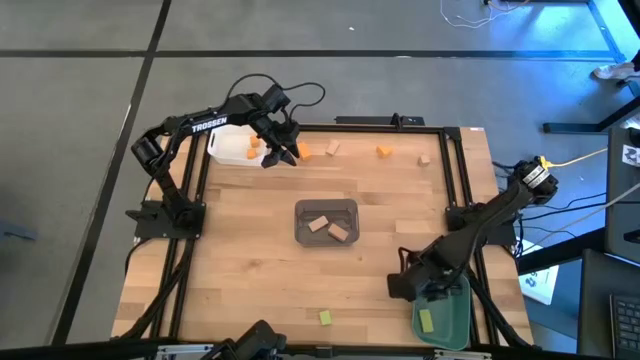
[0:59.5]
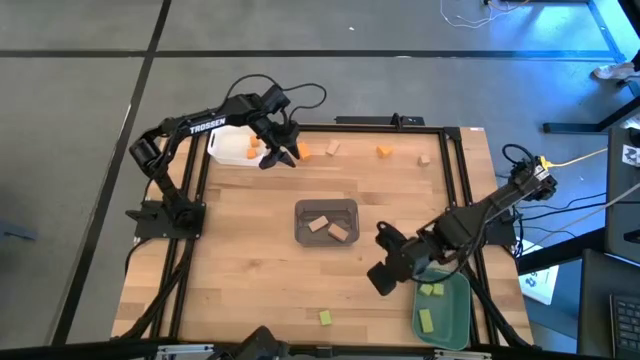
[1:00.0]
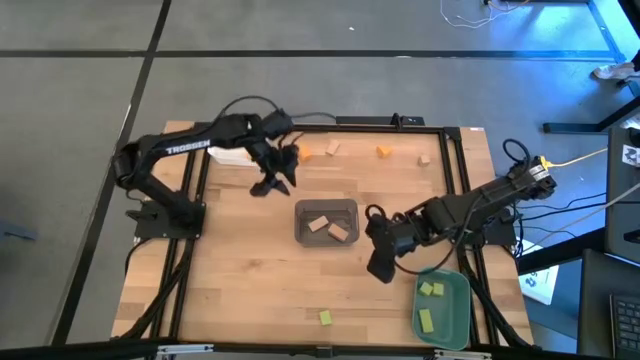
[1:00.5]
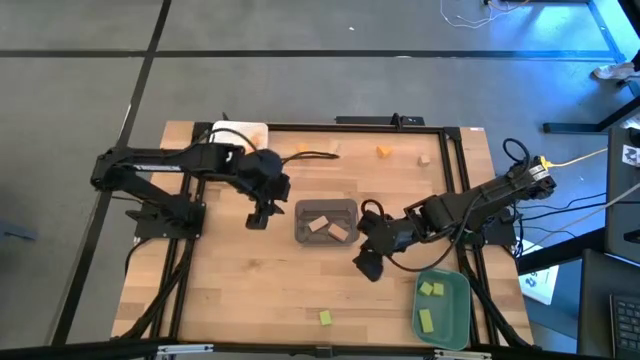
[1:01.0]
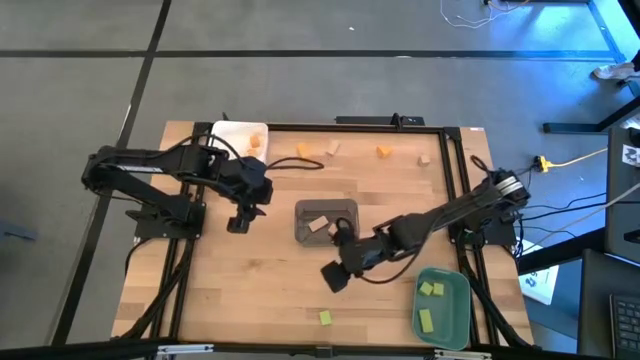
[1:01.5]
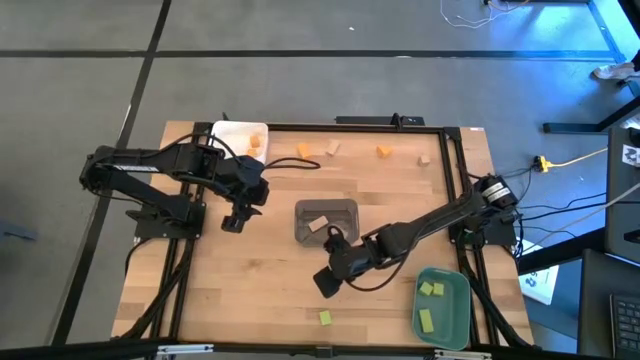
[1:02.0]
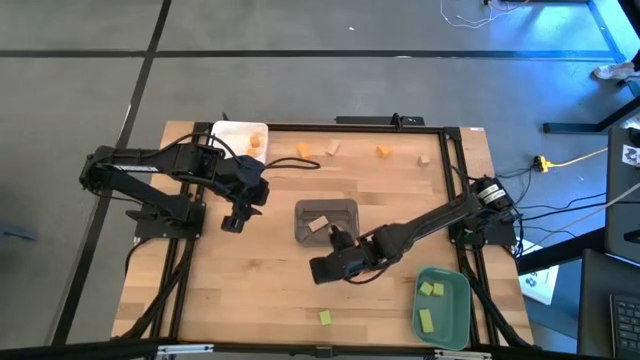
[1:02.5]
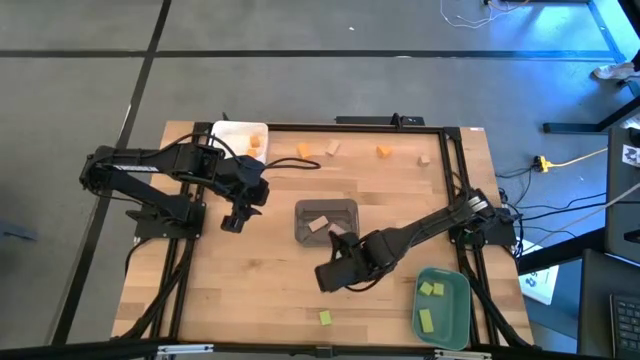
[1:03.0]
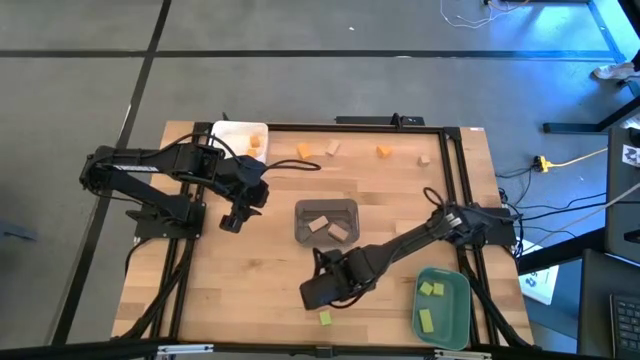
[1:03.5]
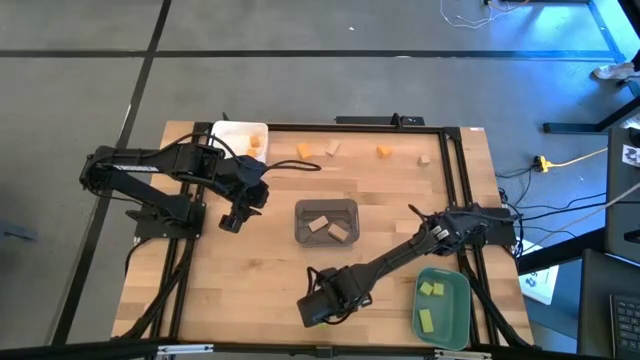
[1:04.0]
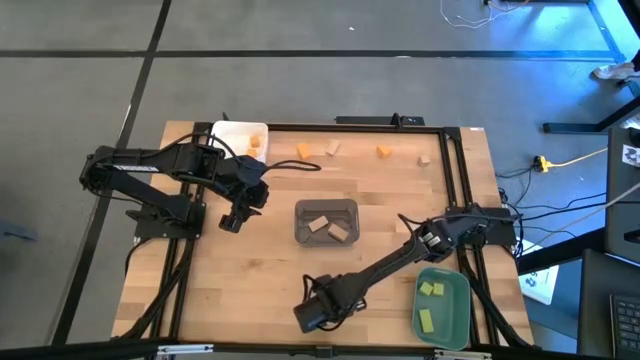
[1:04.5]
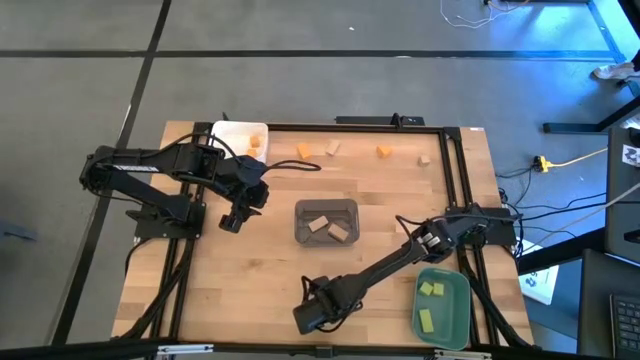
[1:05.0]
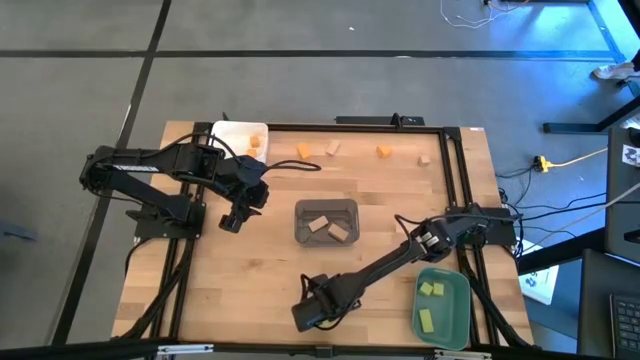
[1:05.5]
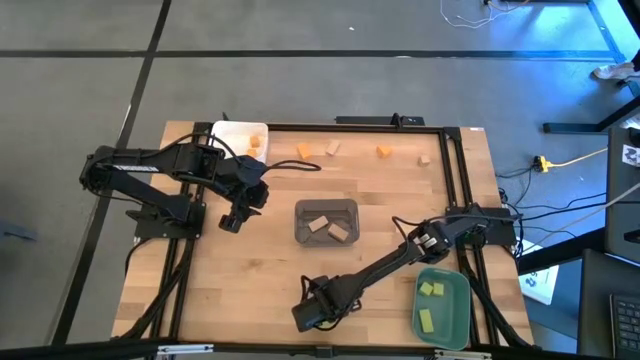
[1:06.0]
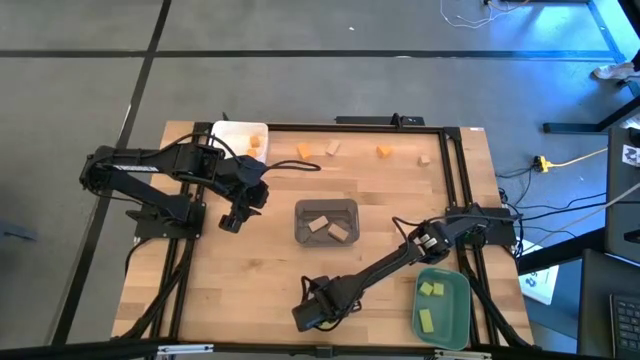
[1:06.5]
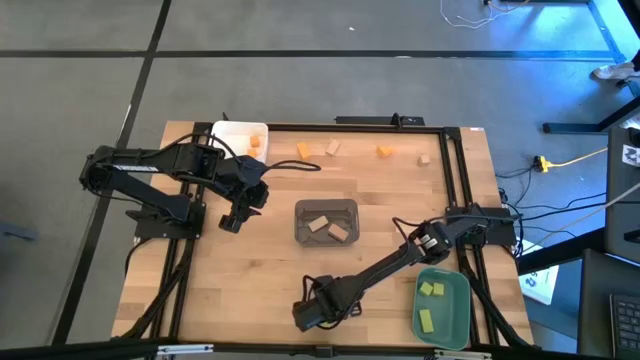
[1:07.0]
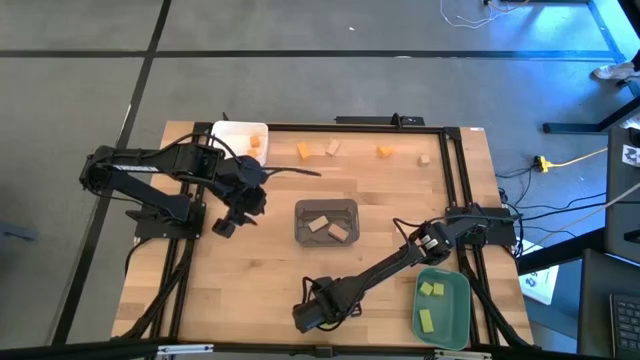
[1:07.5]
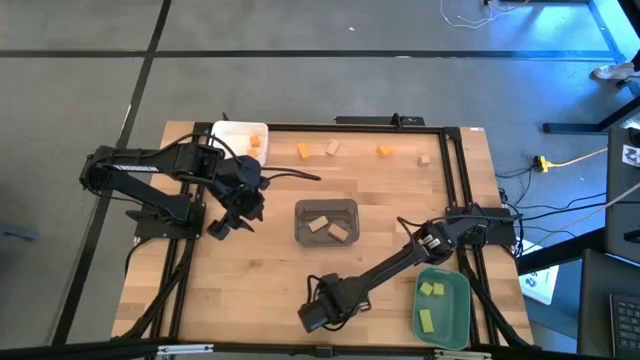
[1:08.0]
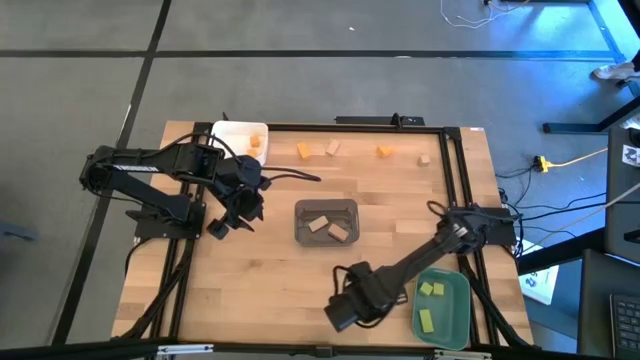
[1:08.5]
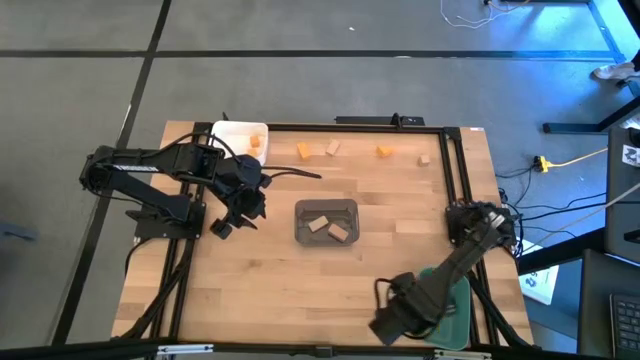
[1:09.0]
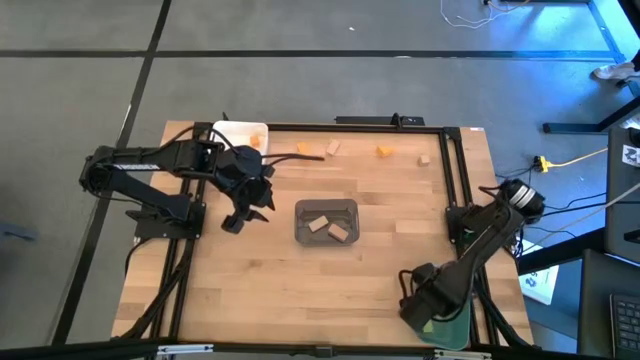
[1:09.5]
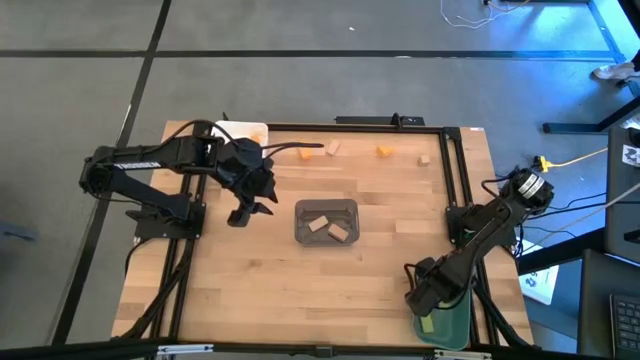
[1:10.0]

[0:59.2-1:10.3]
Task: Sort & place blocks by color
Put the light green block into the green bin

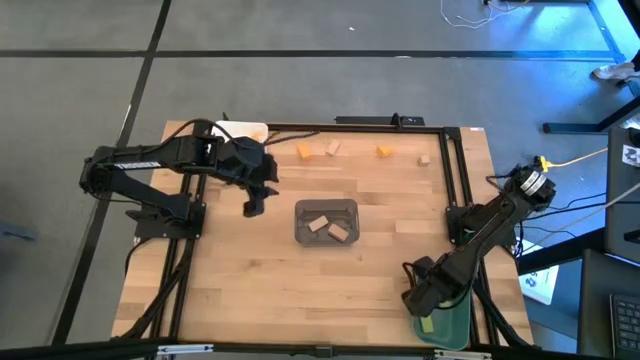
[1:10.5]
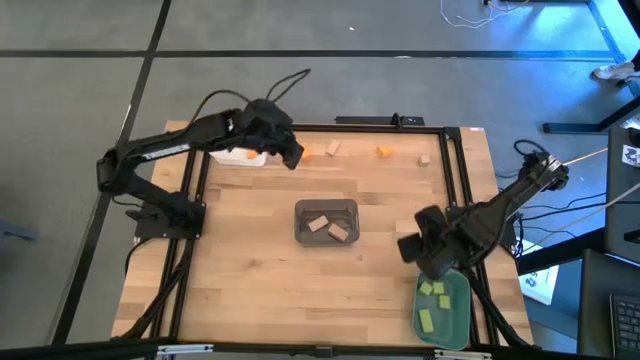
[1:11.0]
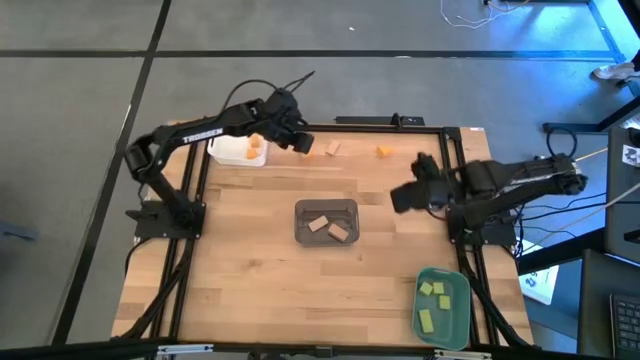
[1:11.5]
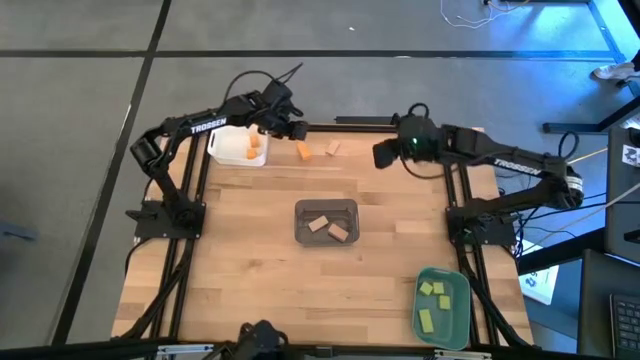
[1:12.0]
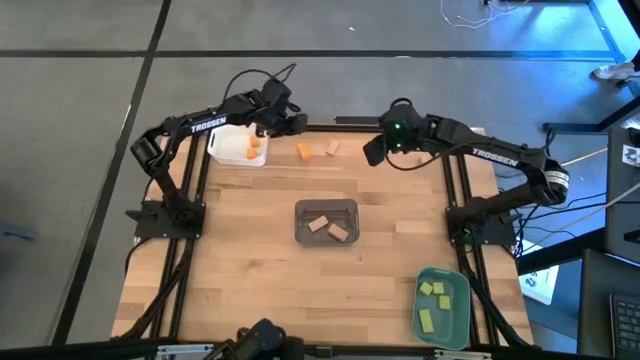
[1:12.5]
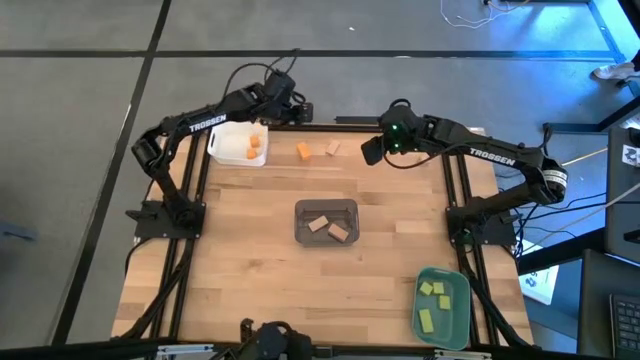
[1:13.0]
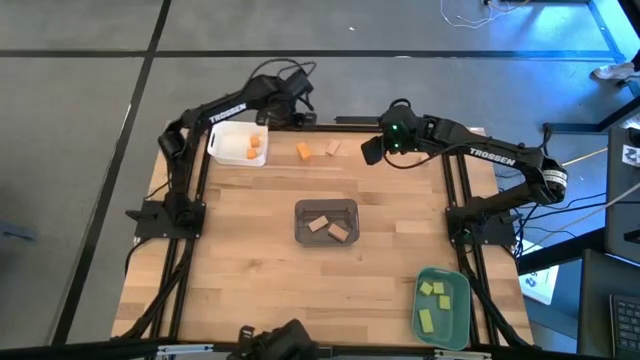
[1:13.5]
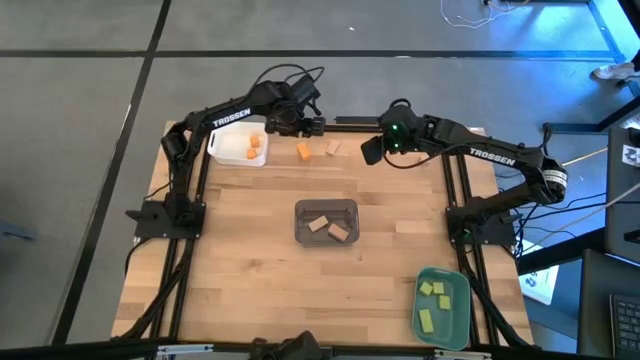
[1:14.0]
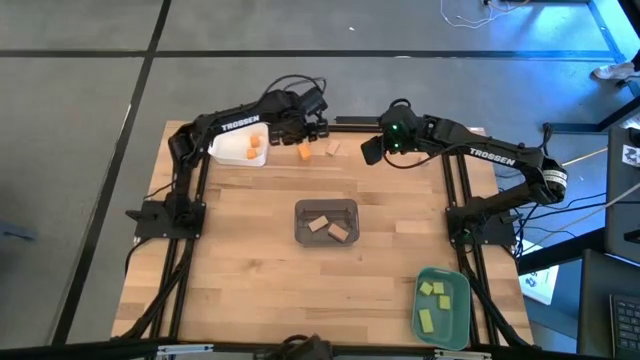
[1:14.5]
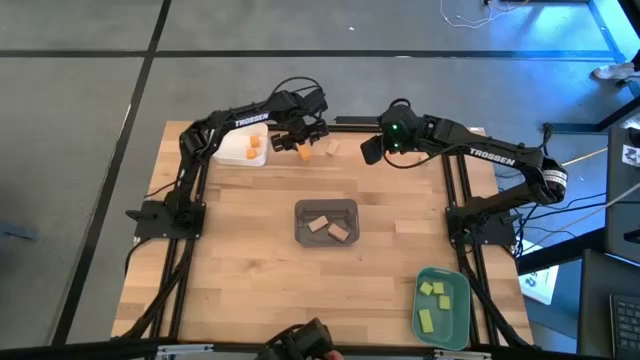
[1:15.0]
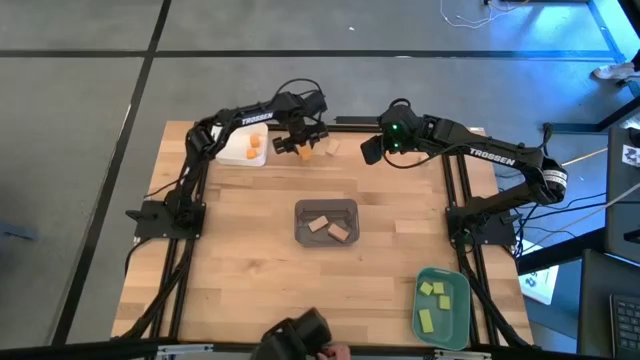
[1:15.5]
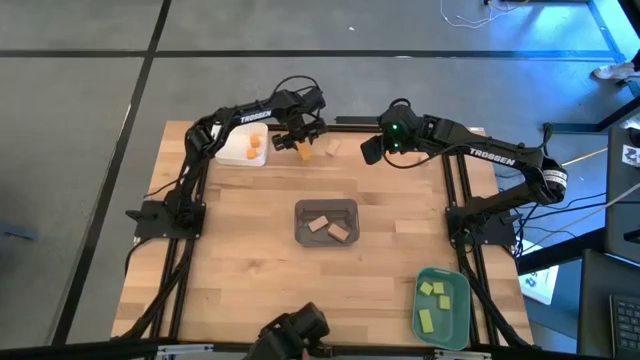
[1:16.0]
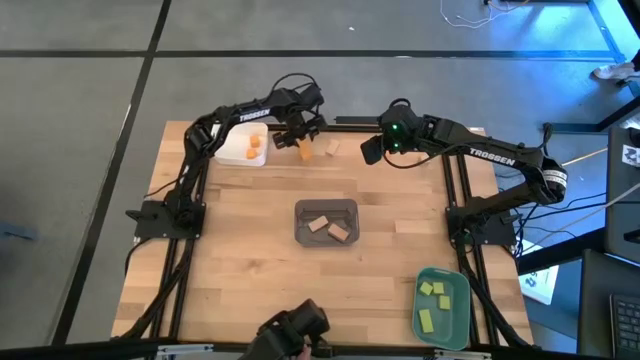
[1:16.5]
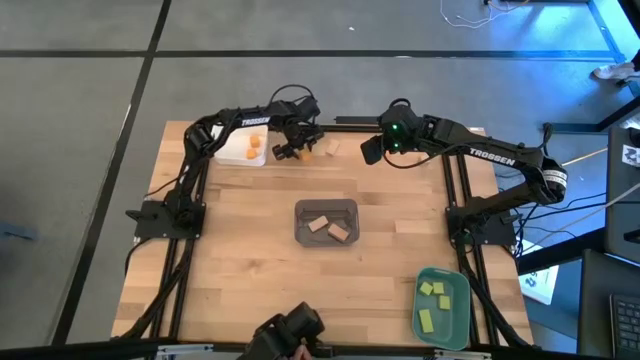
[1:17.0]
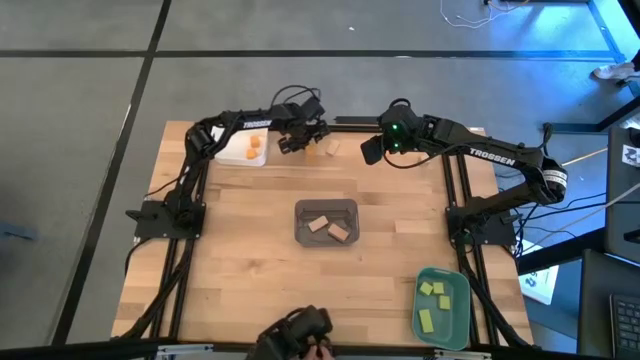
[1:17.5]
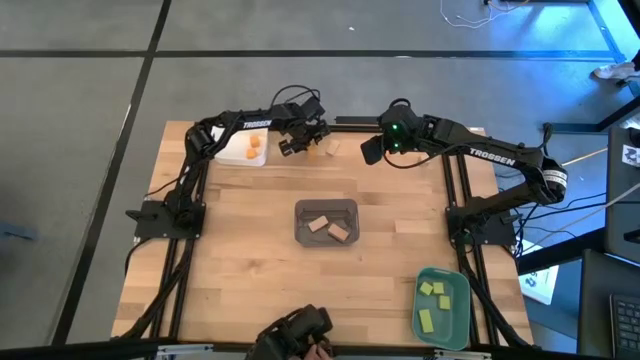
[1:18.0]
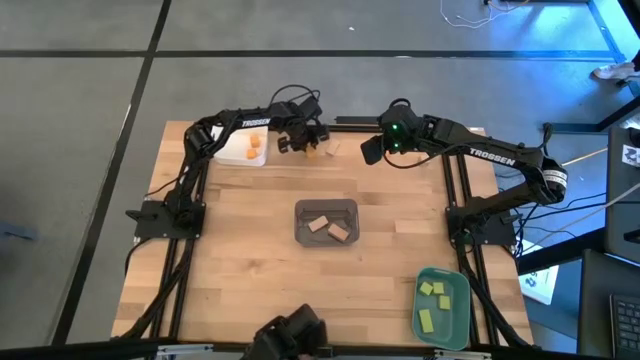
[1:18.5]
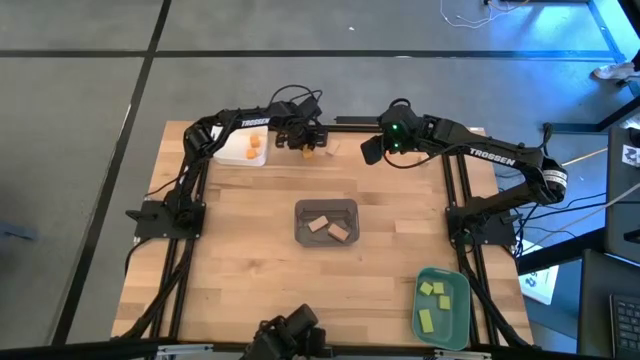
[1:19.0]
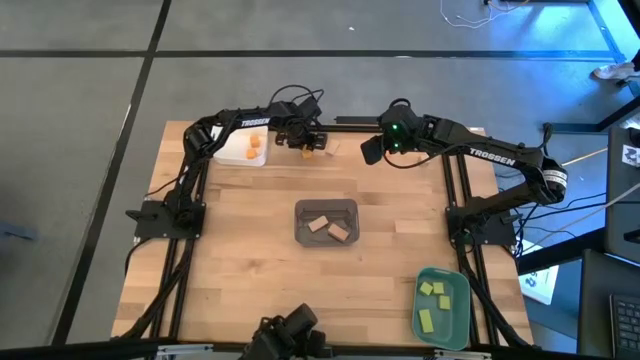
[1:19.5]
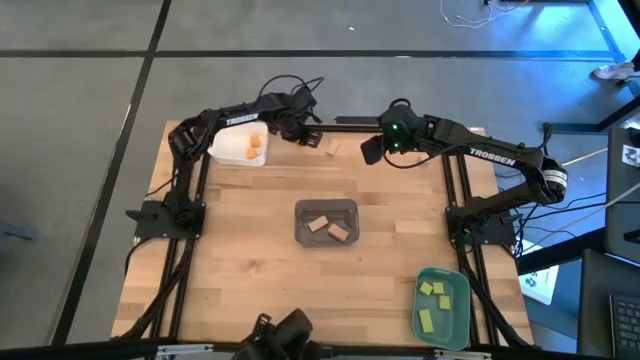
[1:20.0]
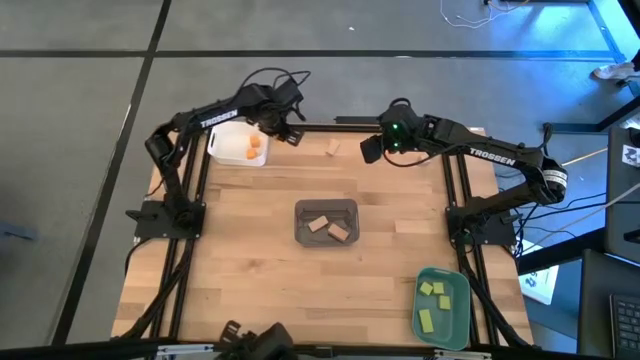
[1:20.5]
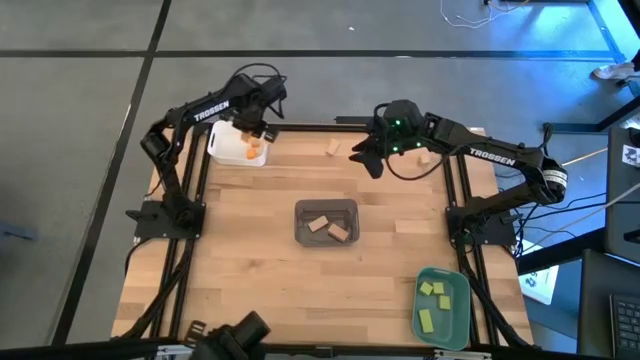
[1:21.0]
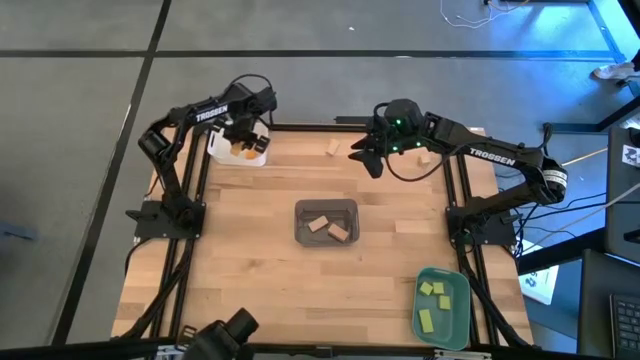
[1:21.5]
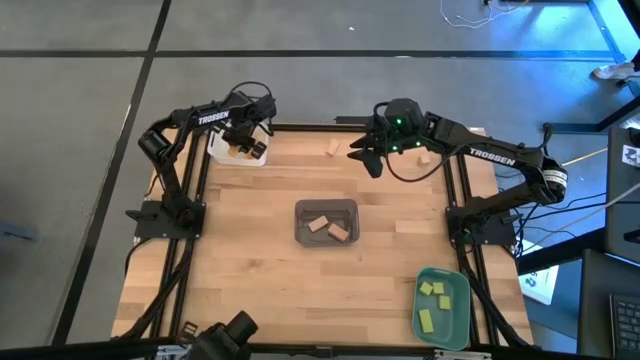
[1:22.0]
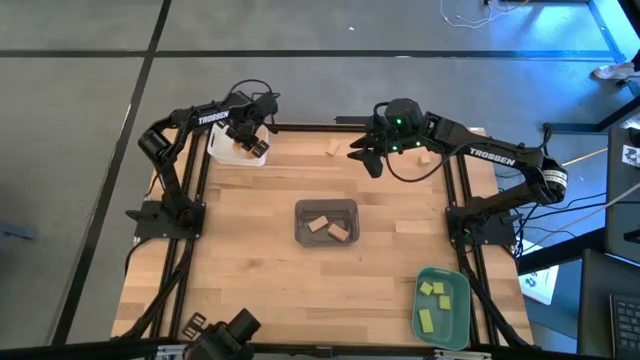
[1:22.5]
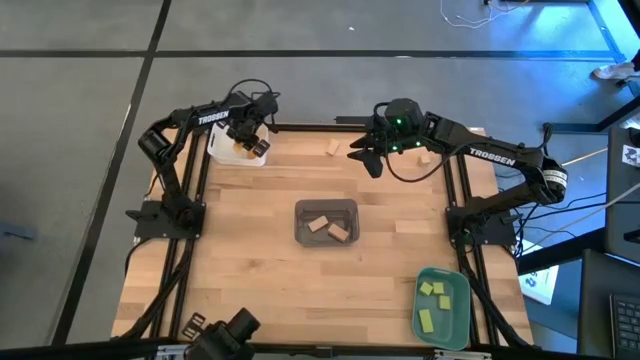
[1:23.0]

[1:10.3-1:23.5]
Put the yellow block into the white bin
